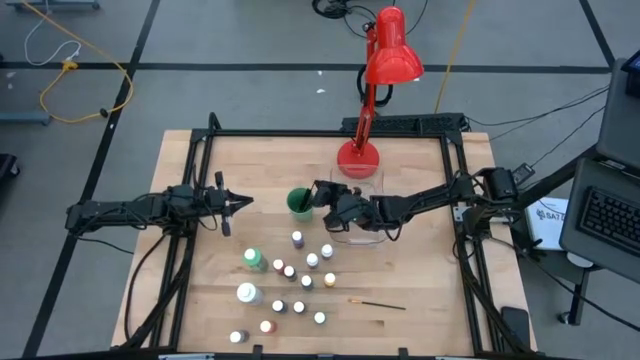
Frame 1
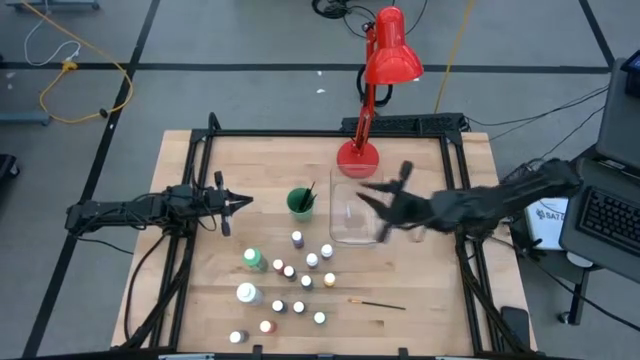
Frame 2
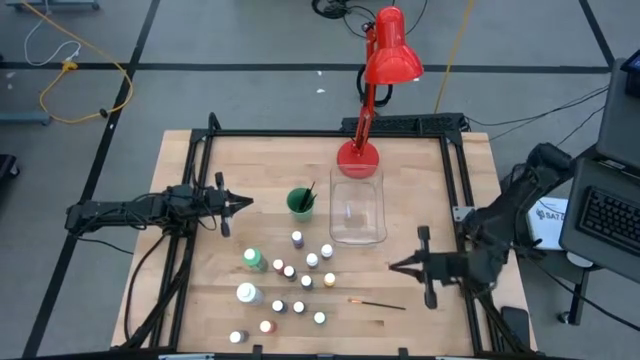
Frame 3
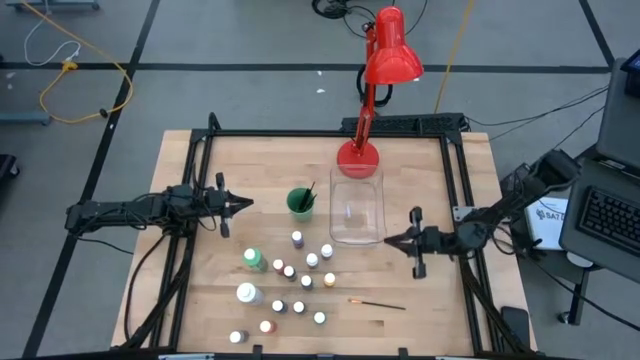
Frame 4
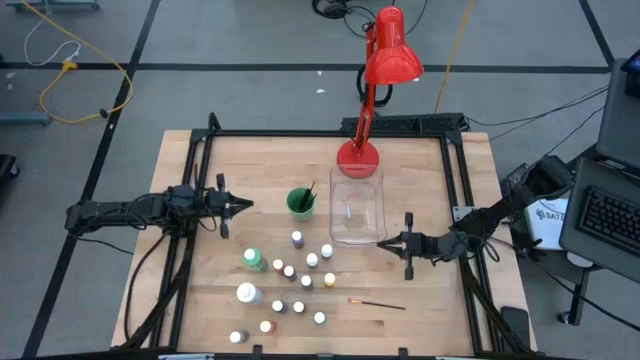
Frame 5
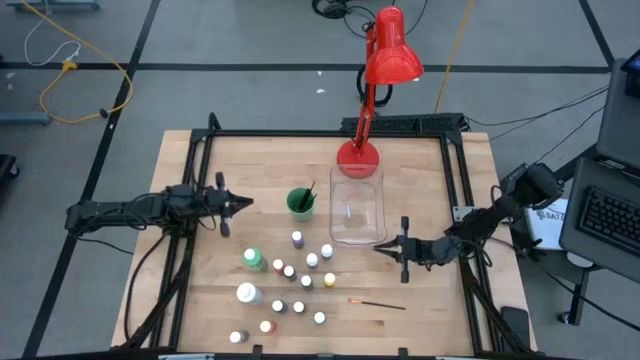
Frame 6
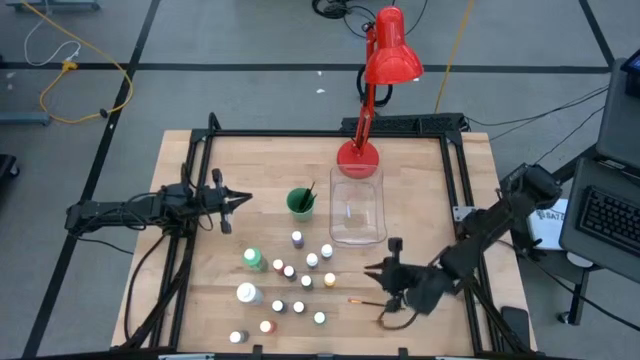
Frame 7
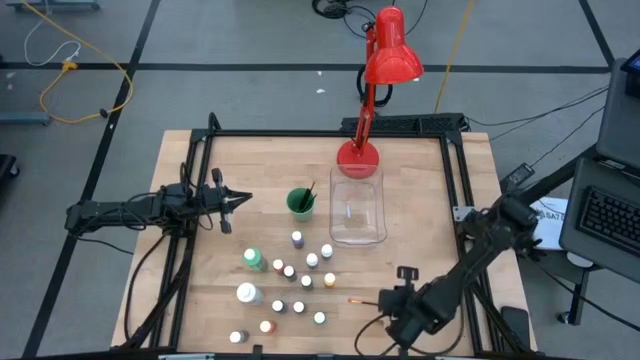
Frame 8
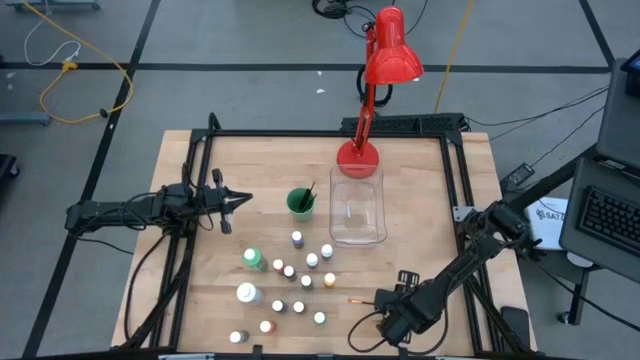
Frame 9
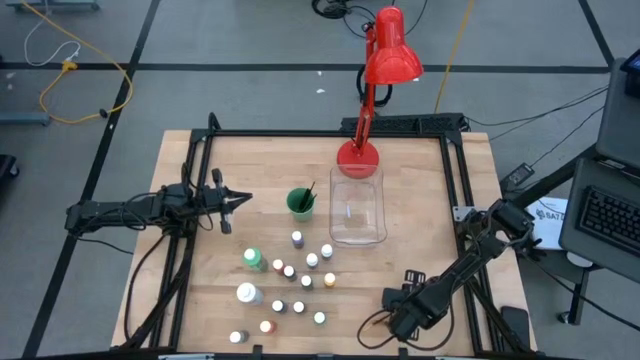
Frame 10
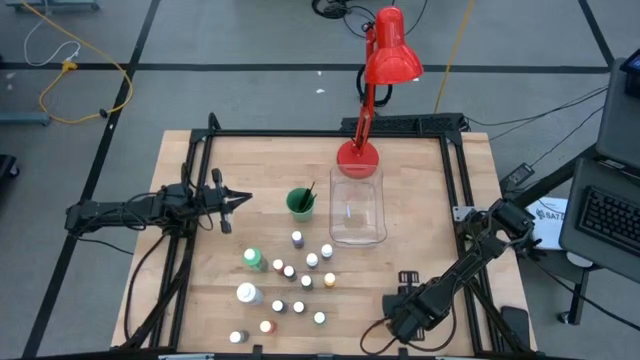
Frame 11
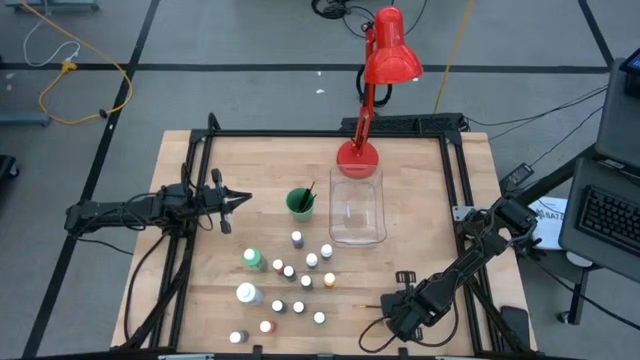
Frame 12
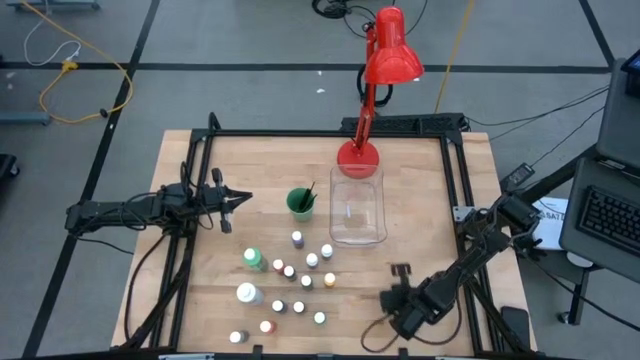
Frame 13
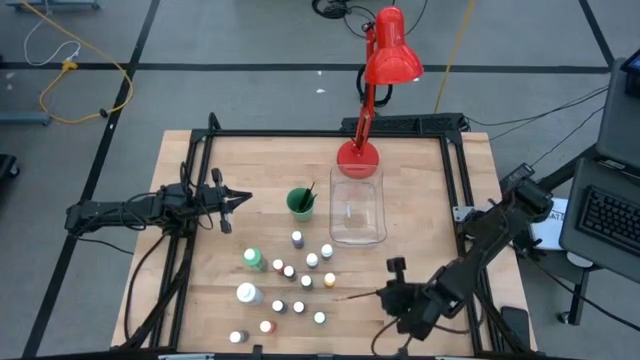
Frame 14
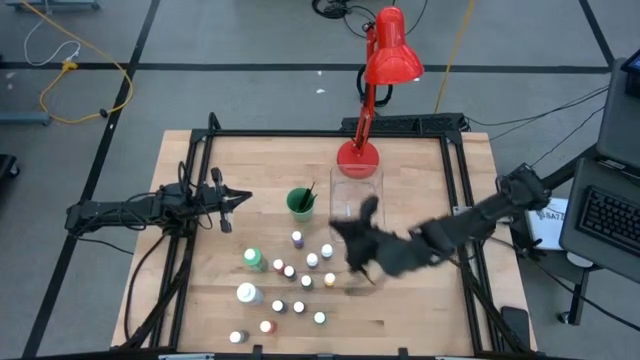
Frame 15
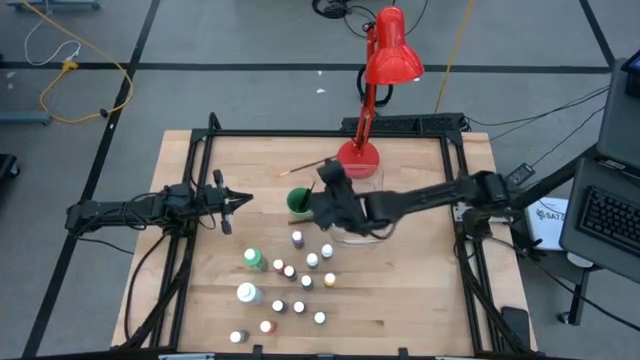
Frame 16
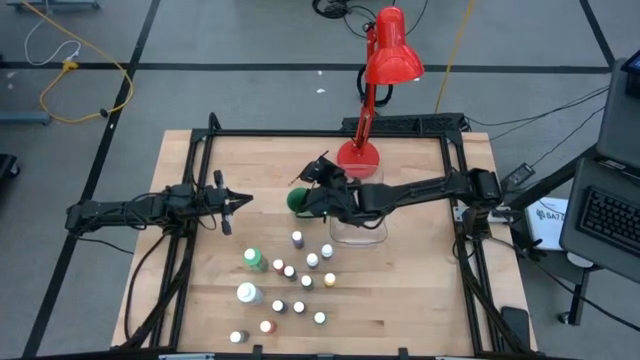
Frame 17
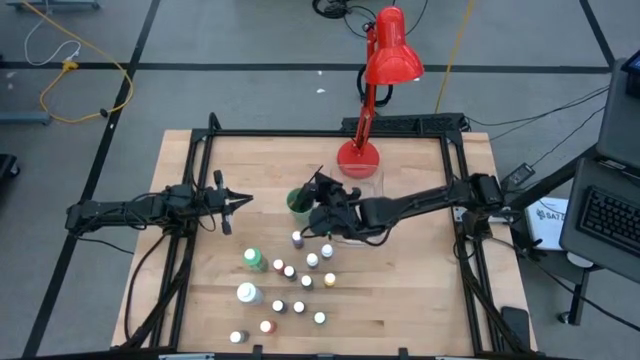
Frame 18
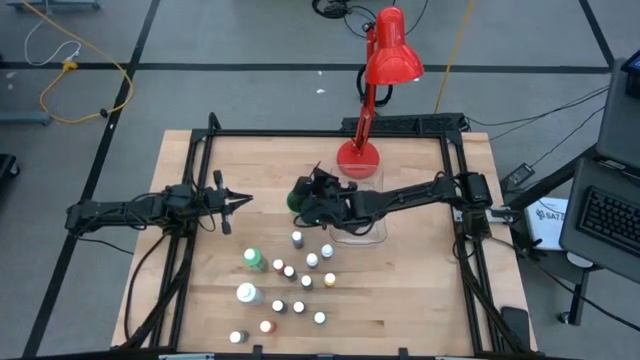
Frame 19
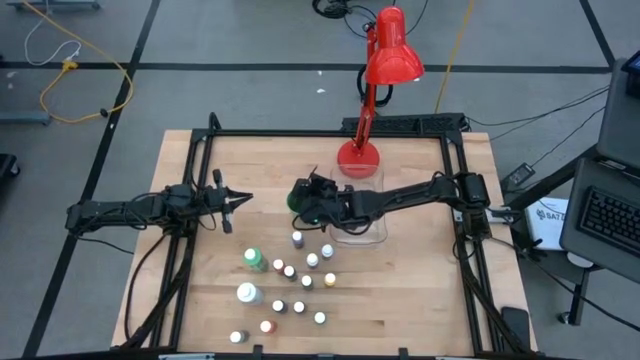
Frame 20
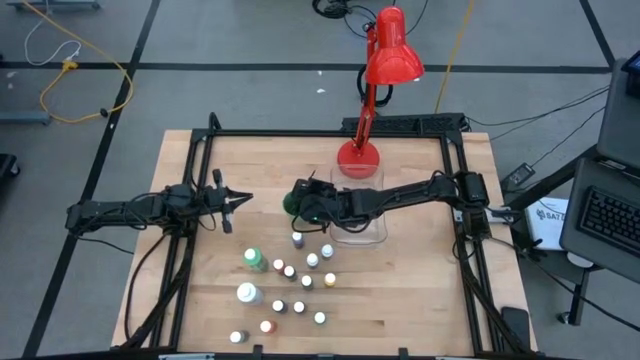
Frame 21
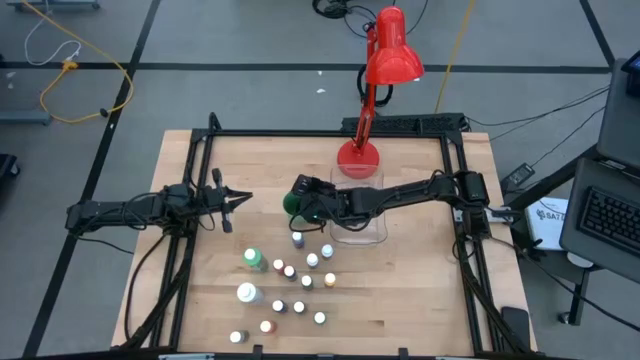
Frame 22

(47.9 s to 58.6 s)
Task: Pick & Place Paint Supplies
Put the yellow paintbrush into the green cup

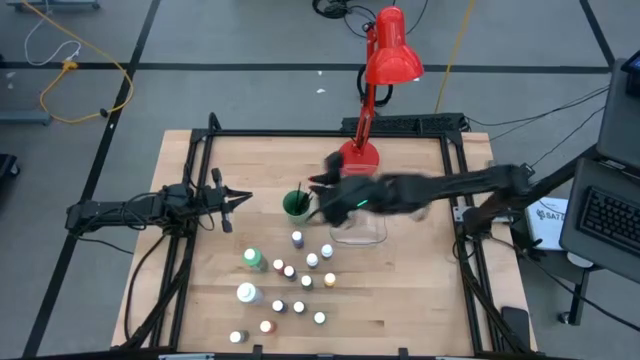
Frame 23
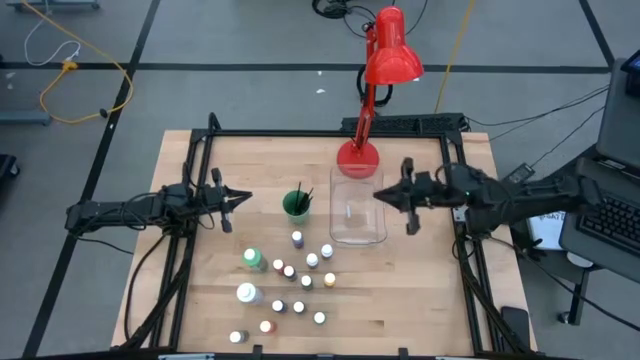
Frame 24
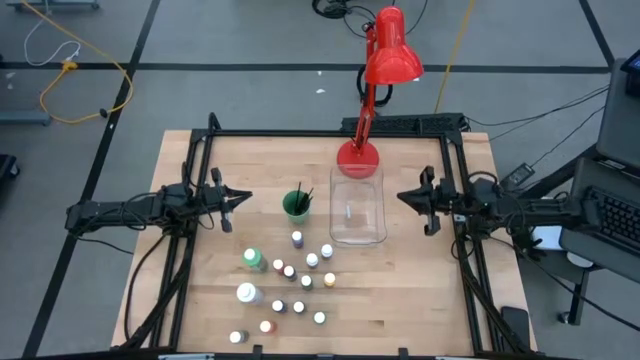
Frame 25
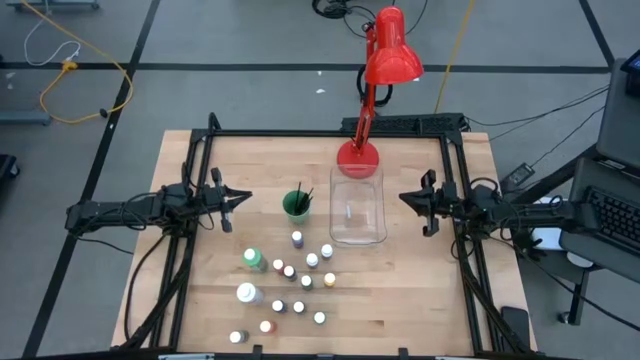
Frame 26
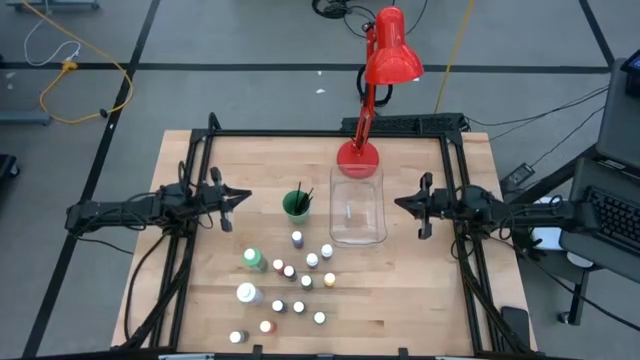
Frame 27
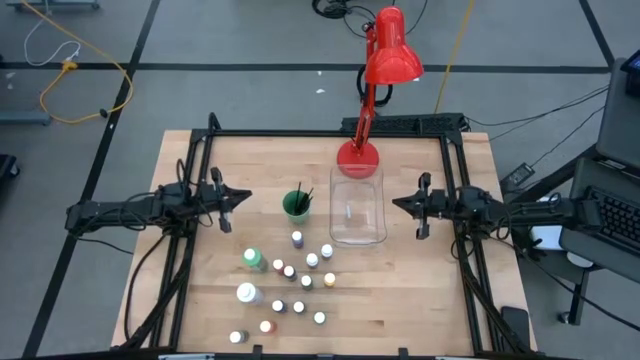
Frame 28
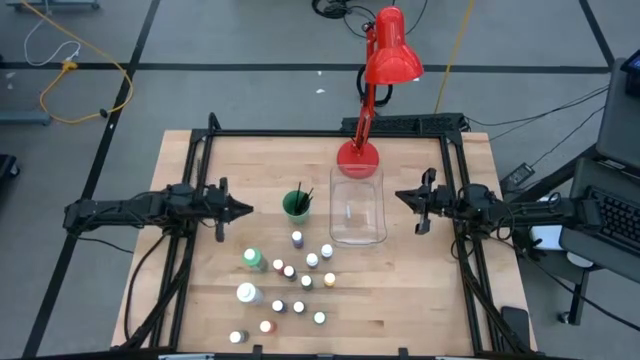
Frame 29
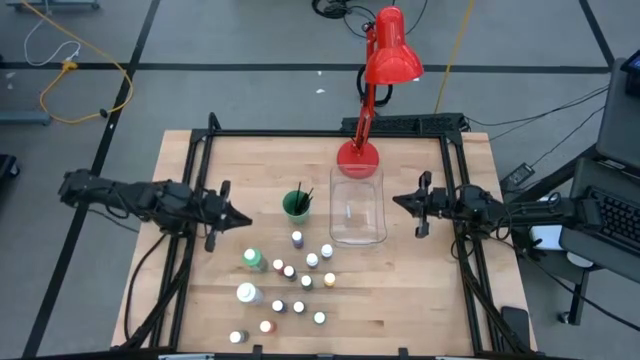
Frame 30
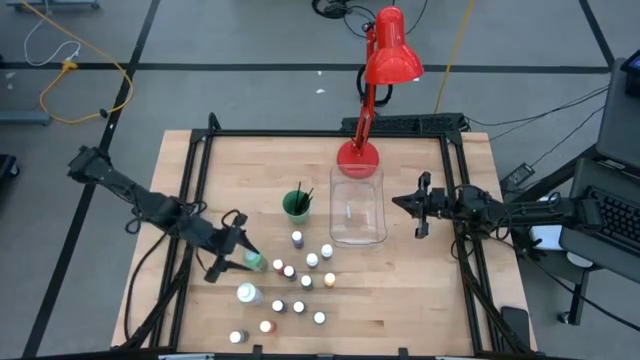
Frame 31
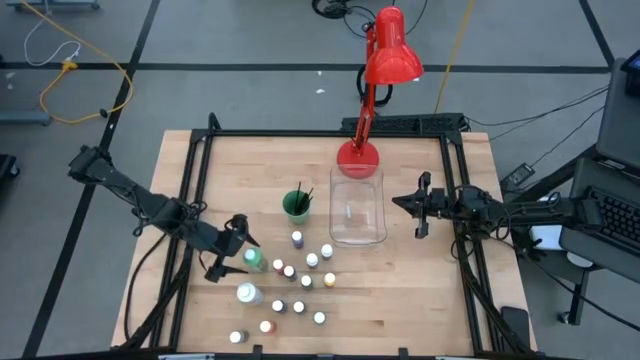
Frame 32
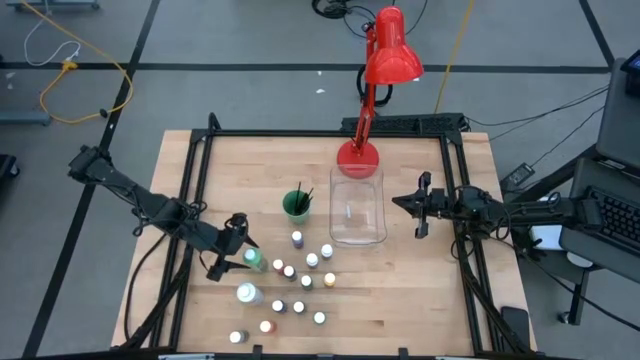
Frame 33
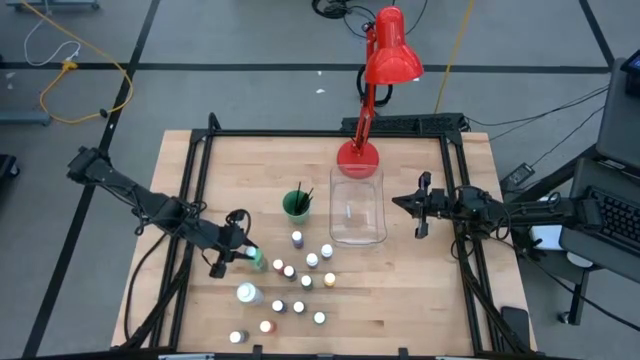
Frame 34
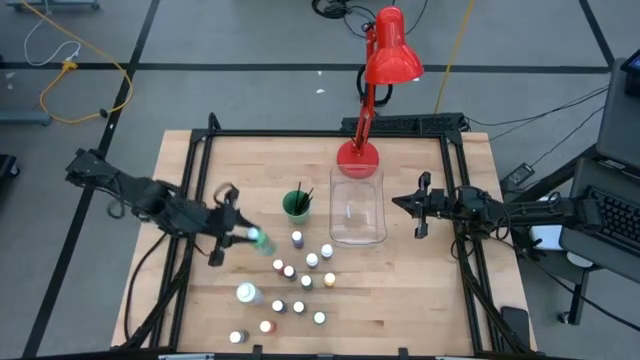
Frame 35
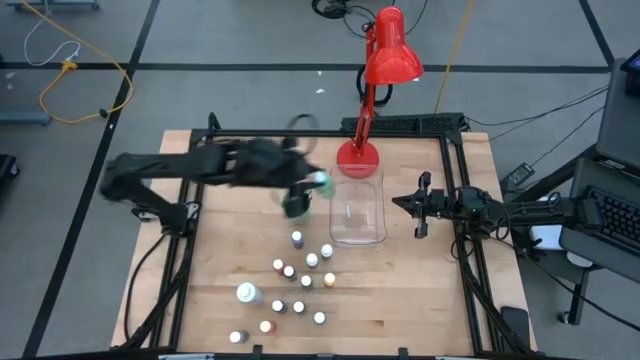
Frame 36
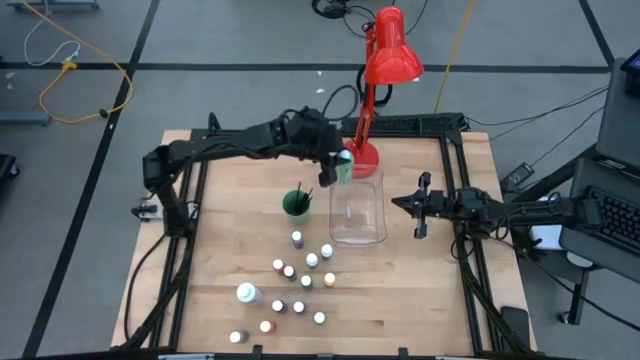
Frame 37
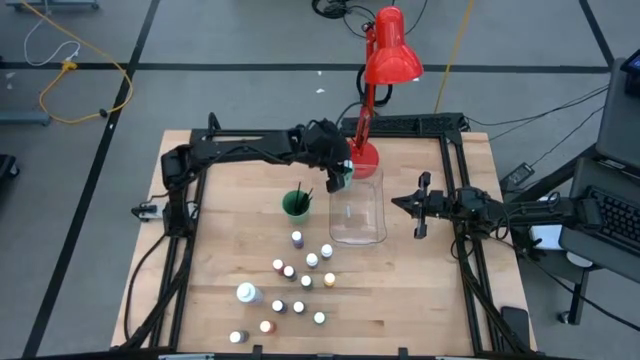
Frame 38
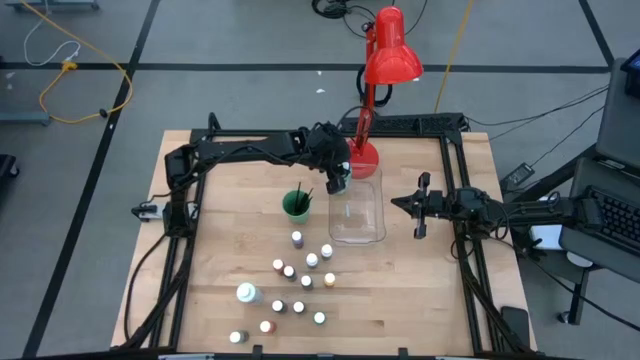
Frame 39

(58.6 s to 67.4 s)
Put the large green paint bottle into the transparent bin

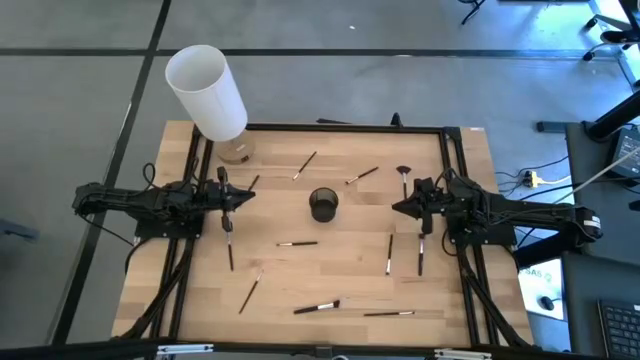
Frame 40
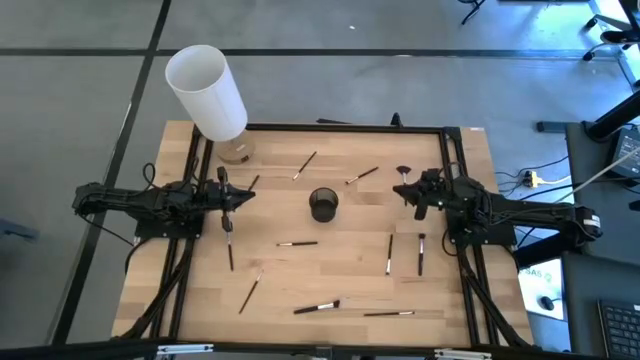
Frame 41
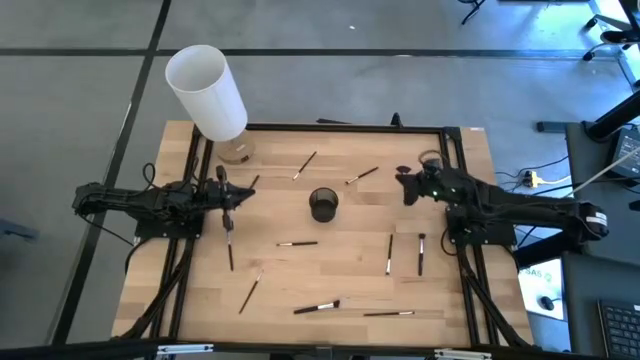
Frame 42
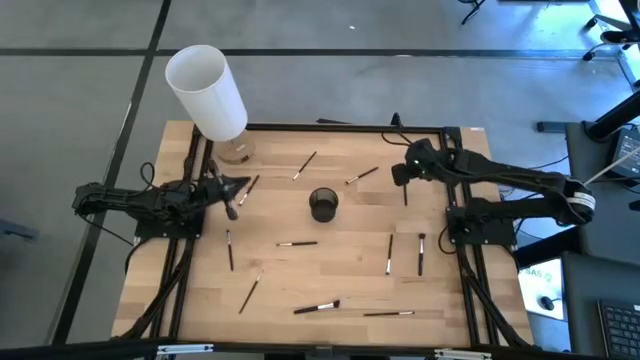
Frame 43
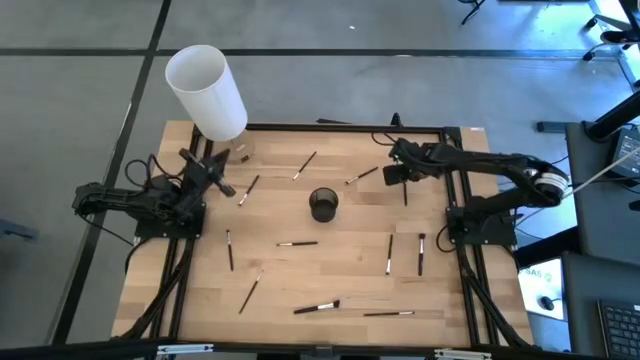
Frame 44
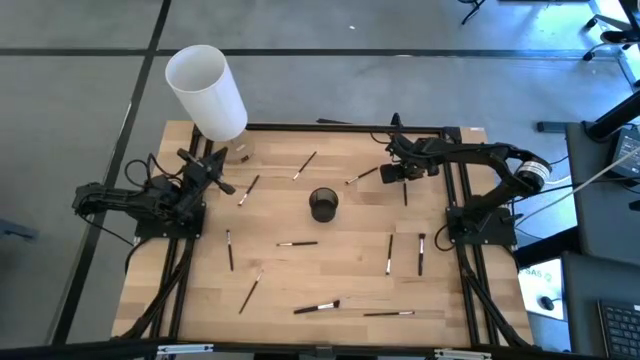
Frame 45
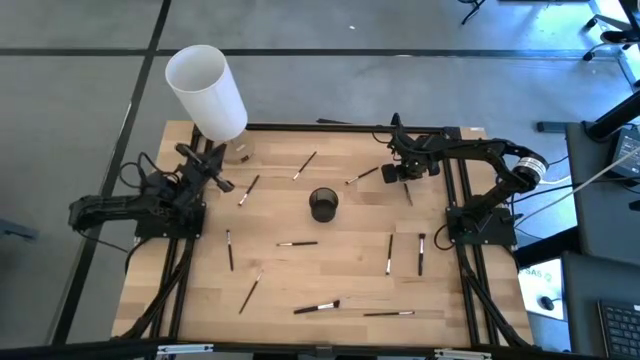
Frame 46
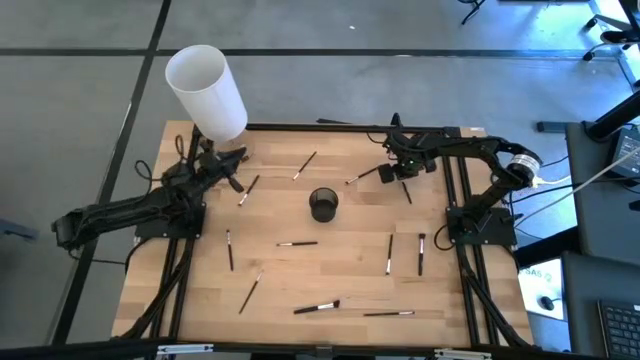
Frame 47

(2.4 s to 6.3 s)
Task: Pick & Place Makeup Brushes
Put the highlighter brush into the makeup brush holder
